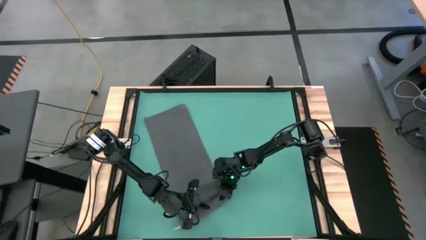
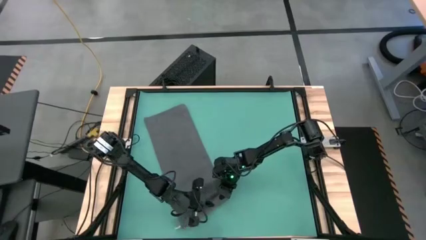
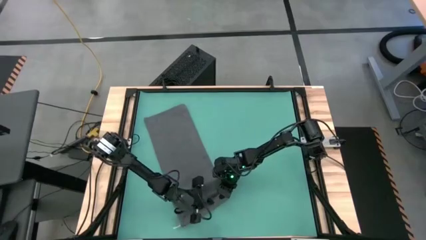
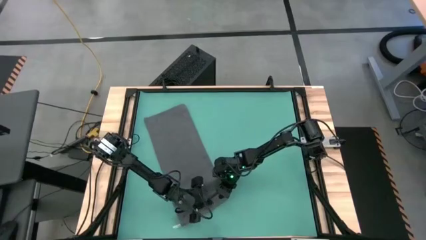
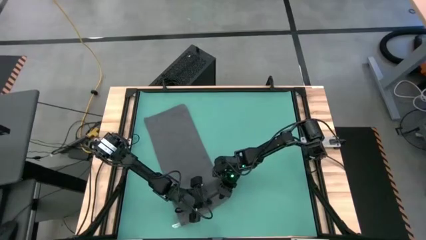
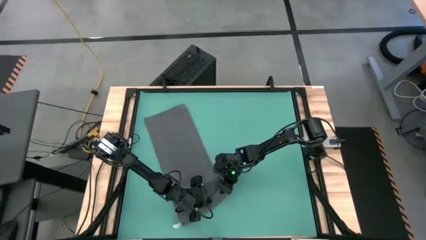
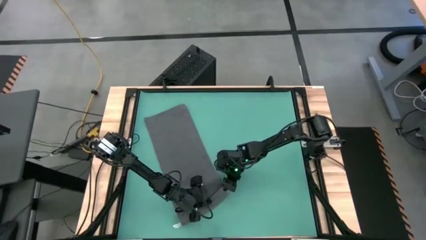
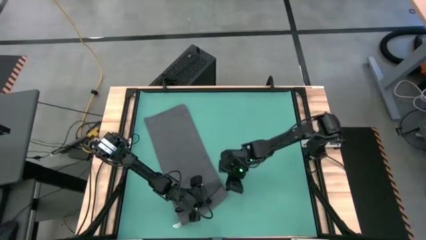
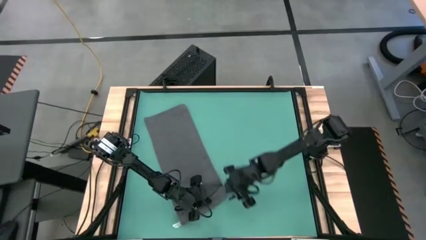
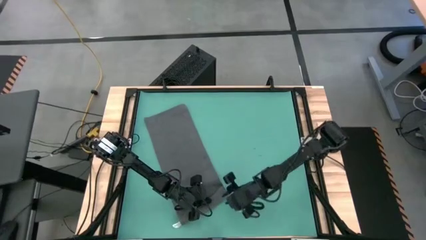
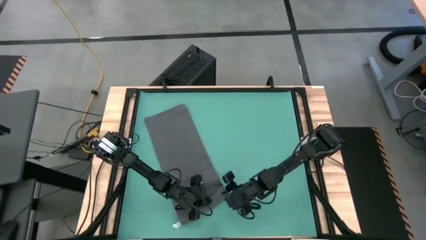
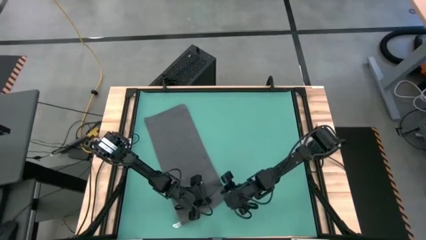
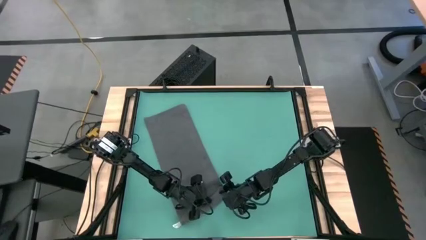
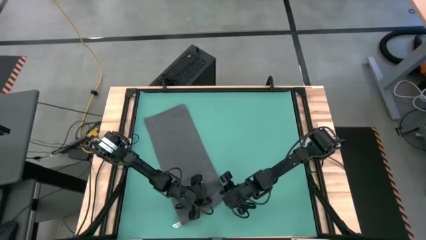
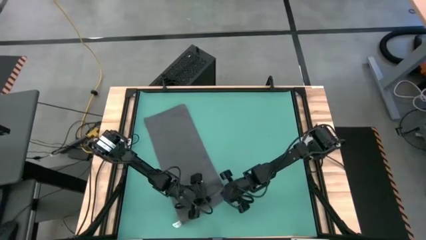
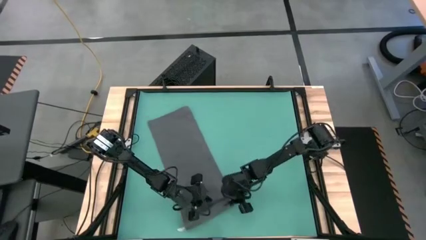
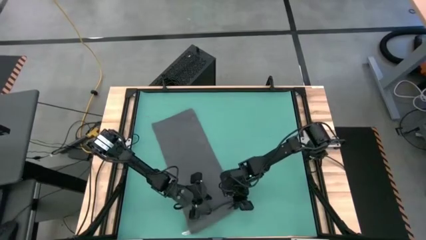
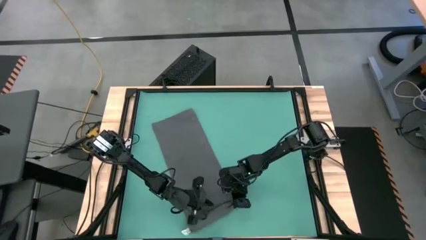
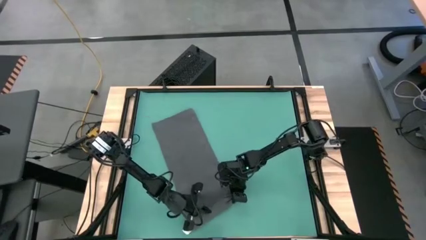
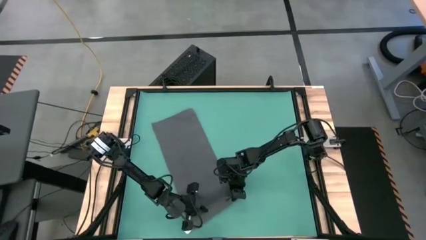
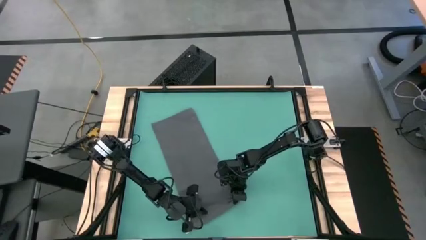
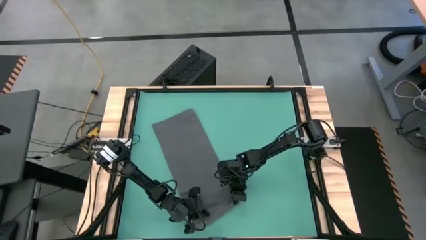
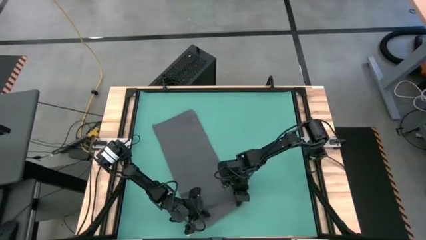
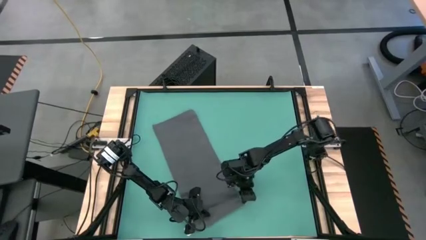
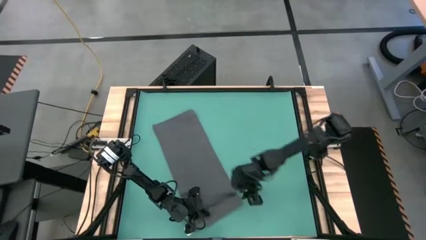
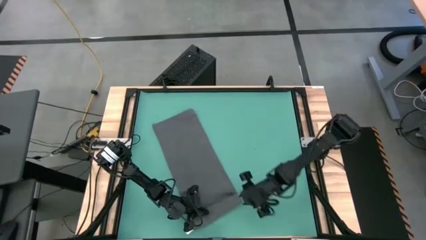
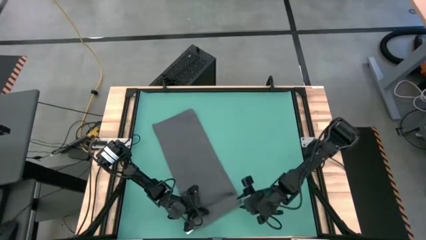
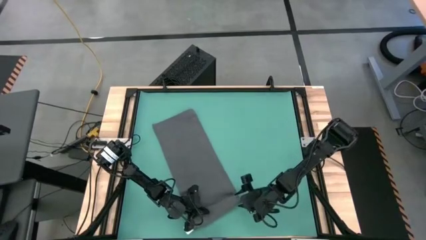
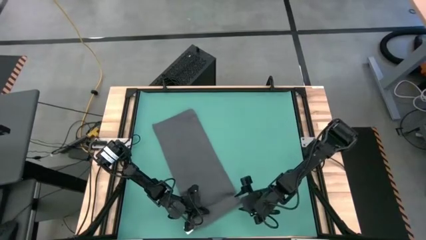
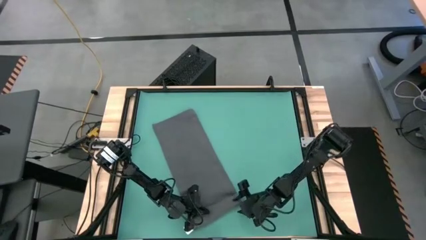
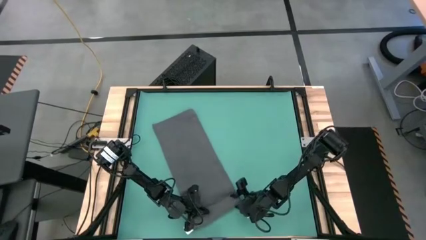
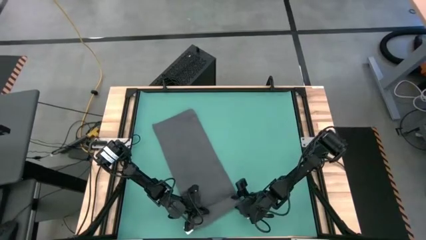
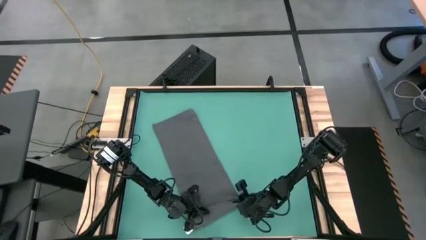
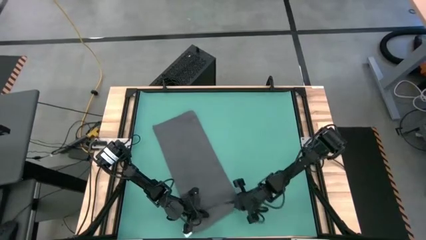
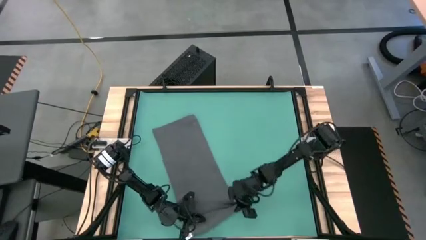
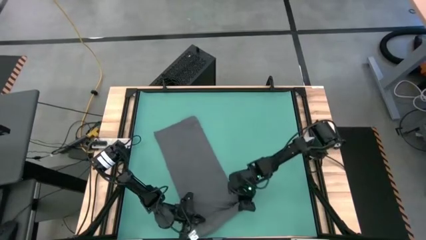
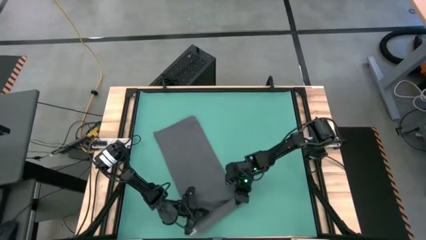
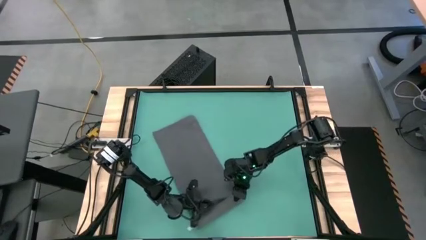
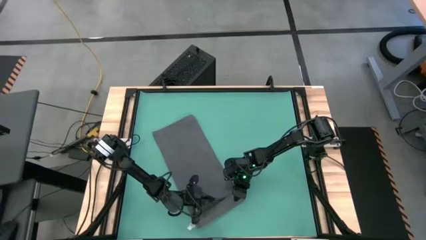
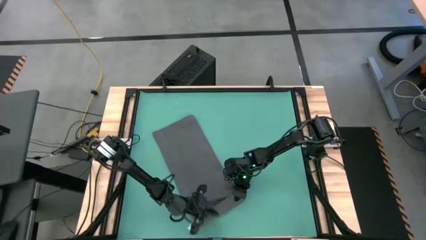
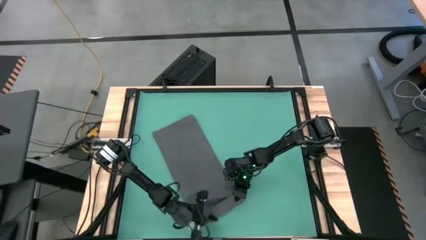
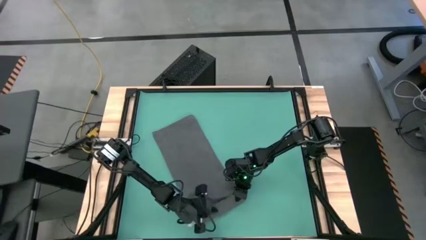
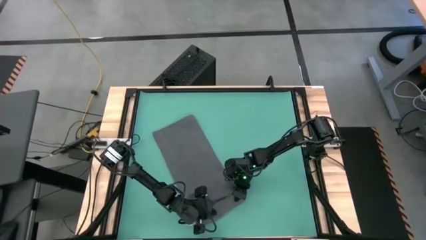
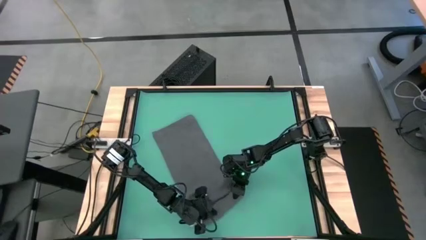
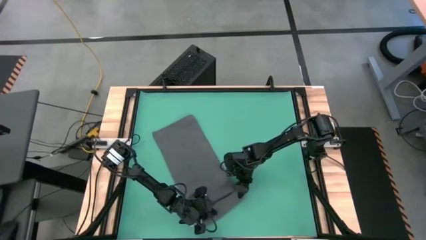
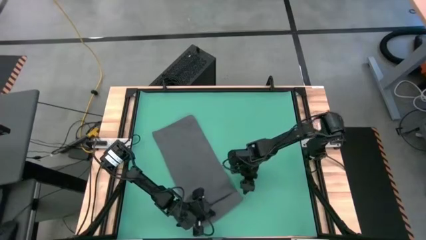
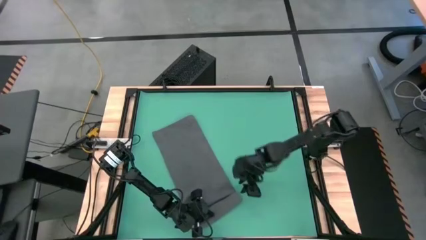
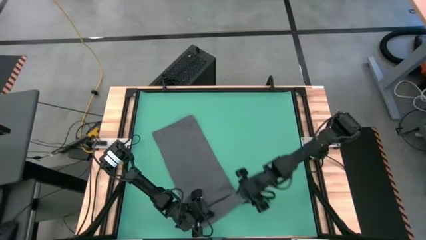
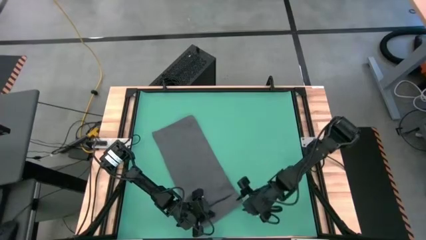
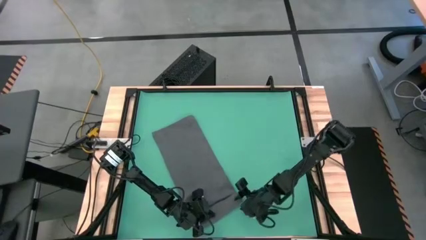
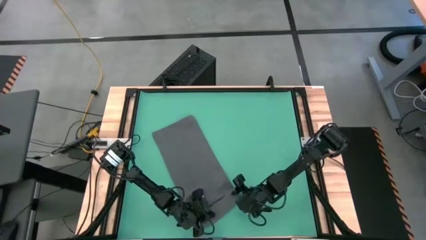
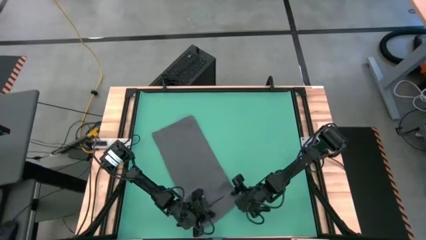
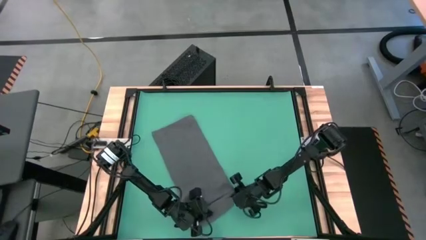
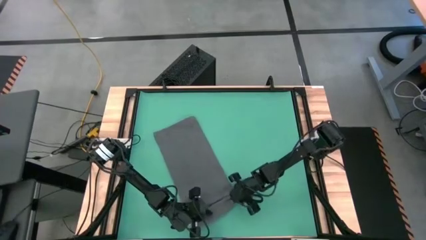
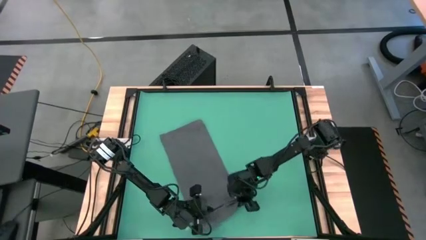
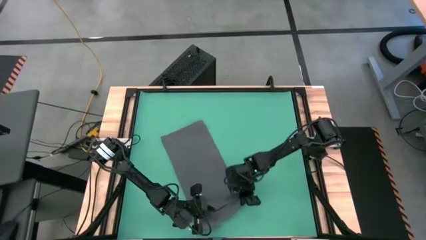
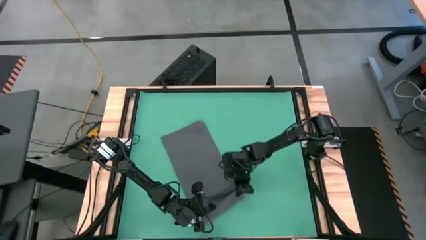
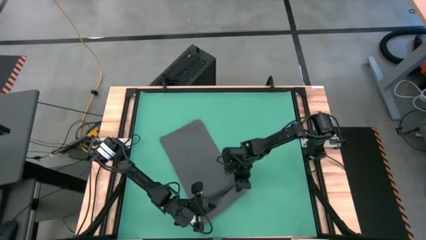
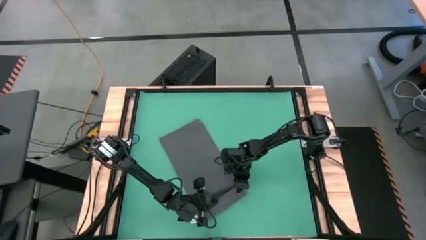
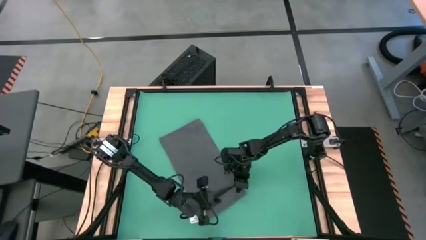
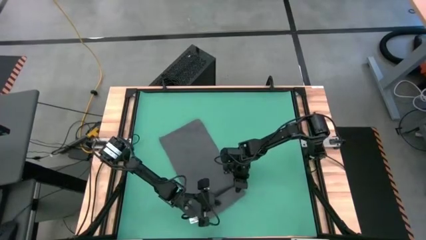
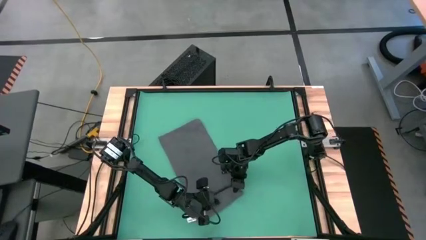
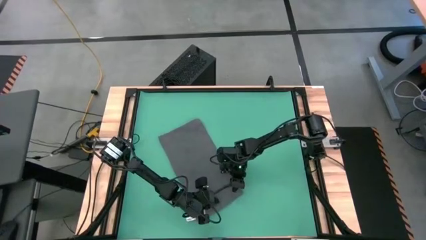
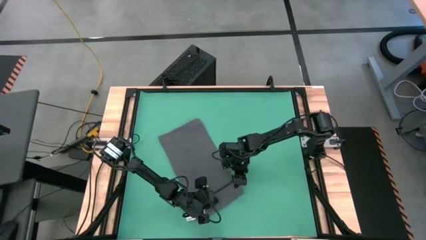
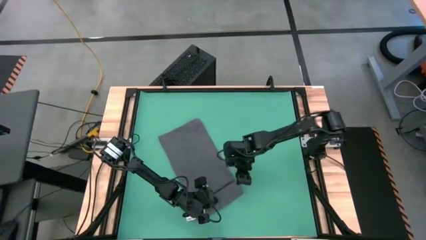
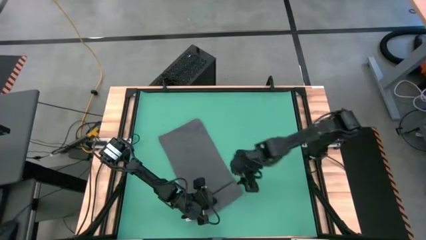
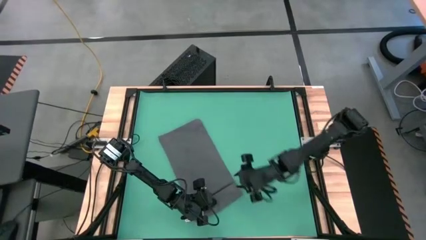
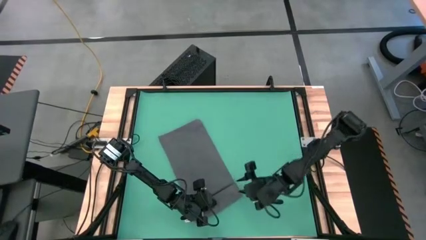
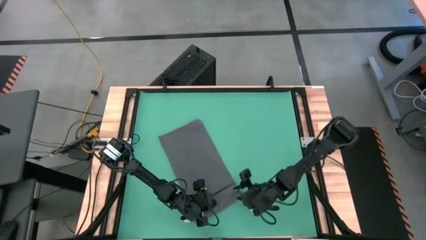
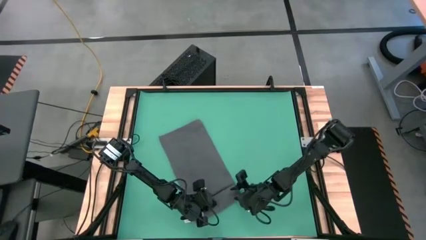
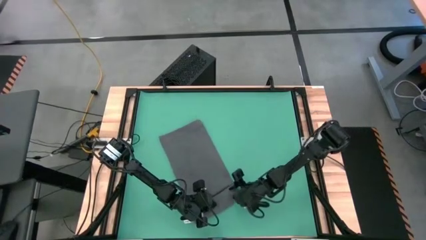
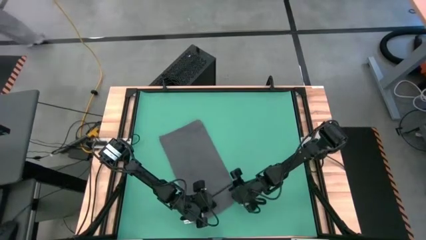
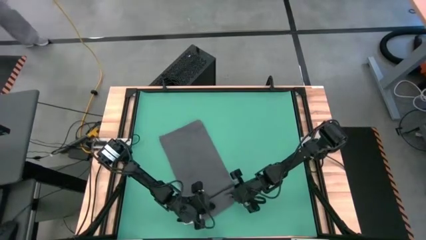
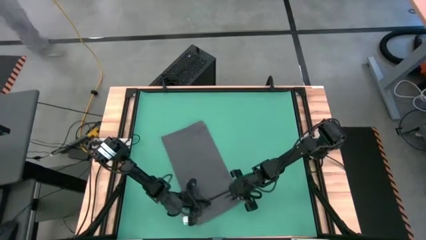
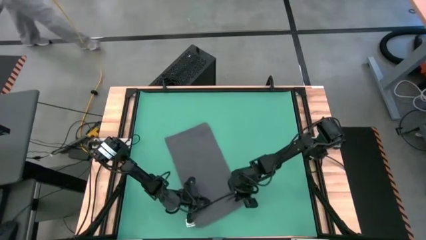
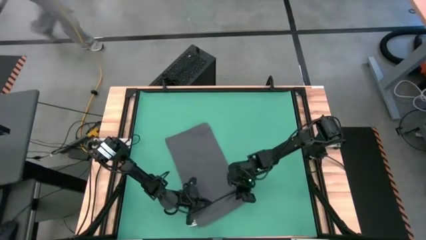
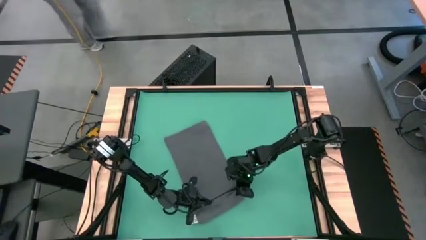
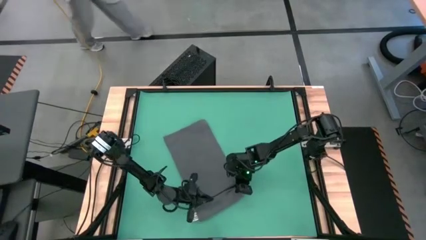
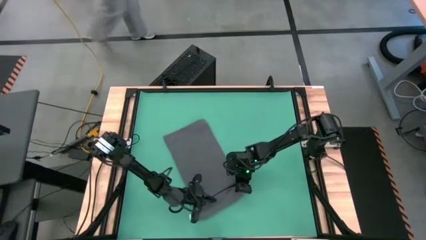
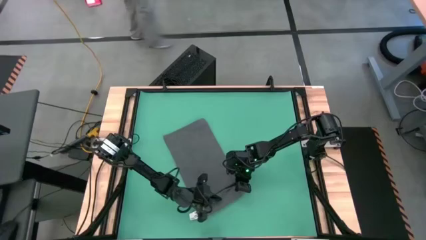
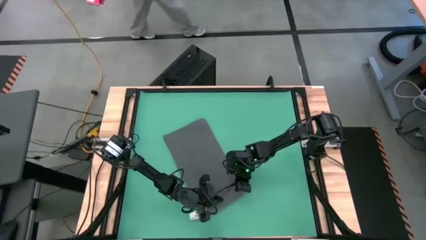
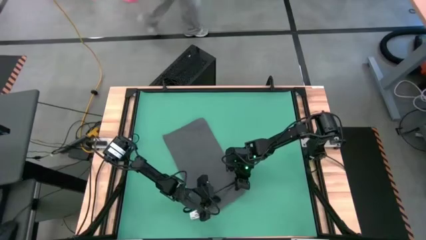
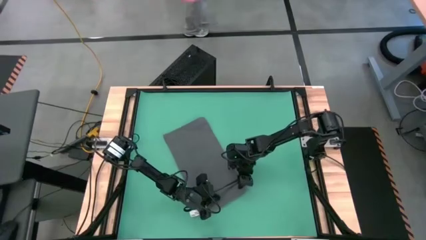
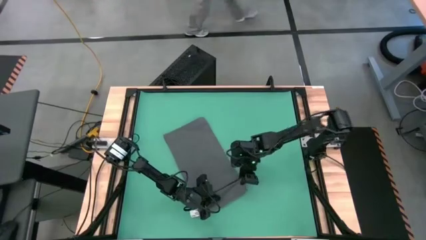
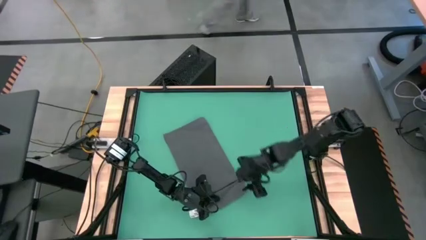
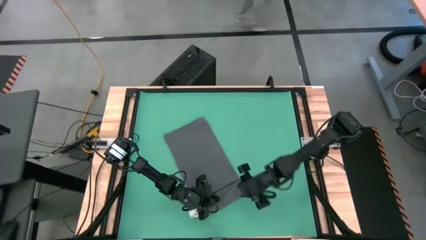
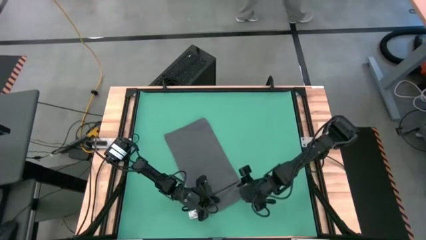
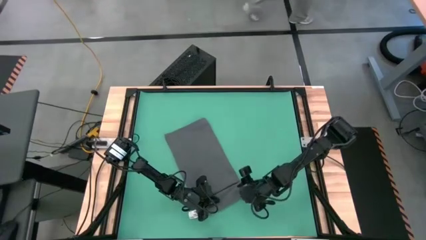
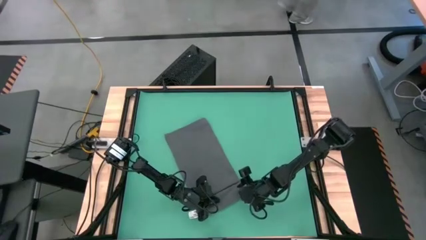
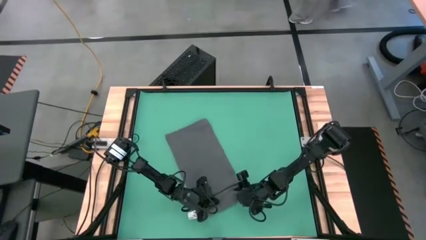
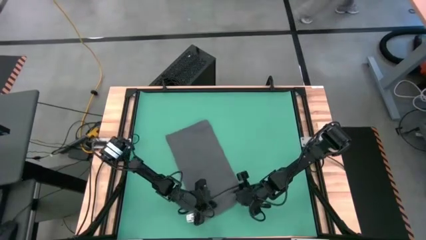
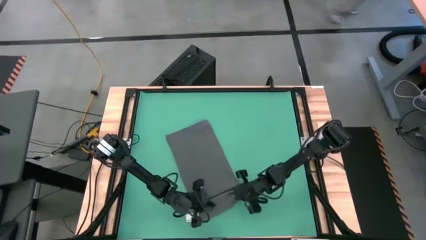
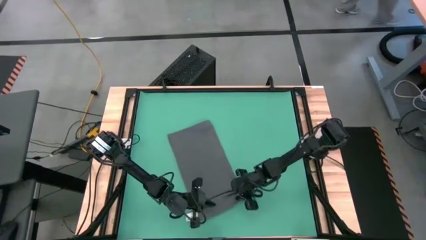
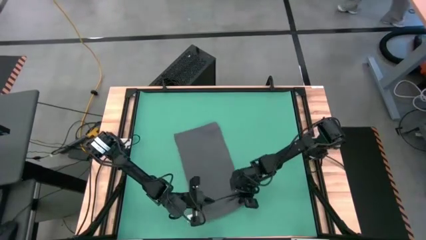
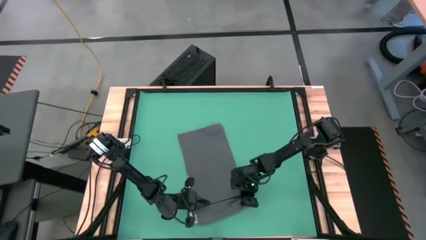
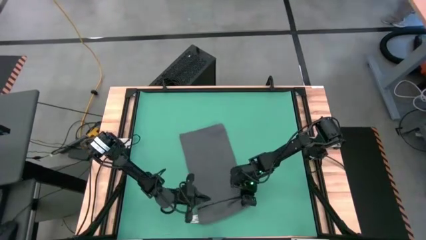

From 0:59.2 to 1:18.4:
Task: Roll towel
Roll the gray towel
